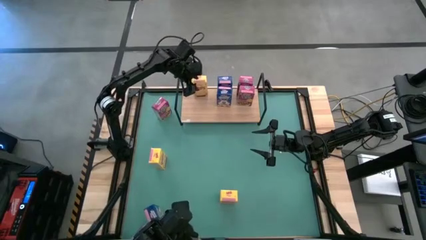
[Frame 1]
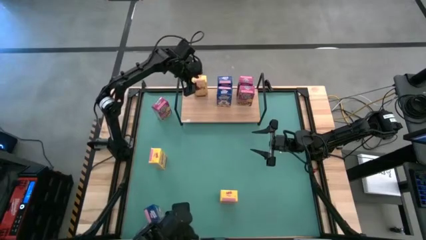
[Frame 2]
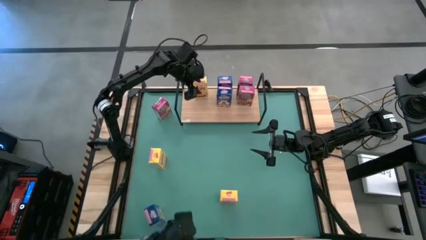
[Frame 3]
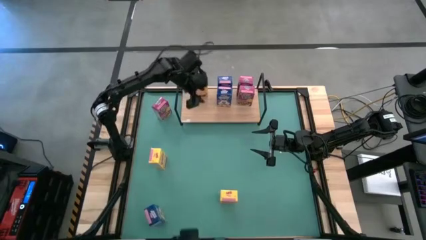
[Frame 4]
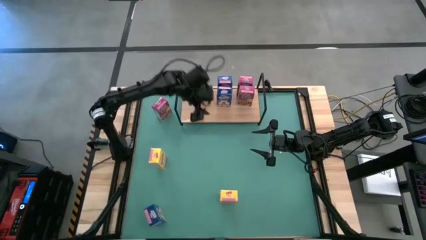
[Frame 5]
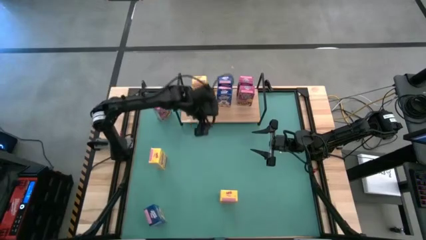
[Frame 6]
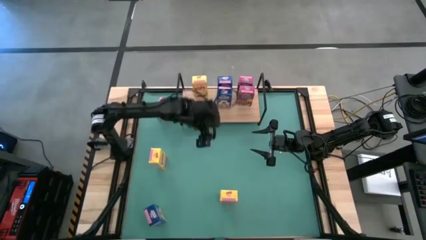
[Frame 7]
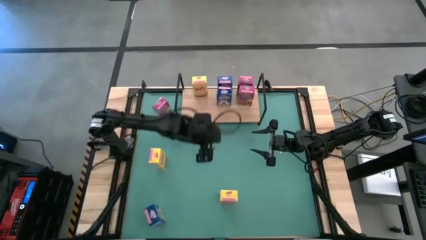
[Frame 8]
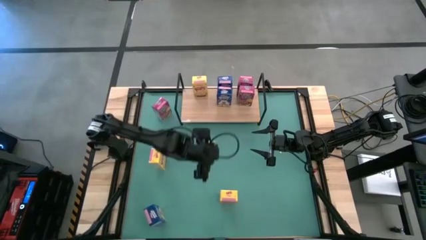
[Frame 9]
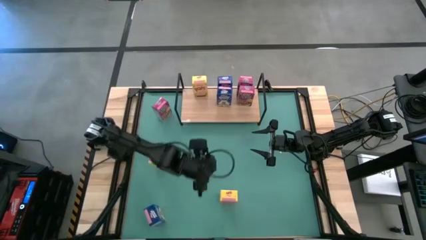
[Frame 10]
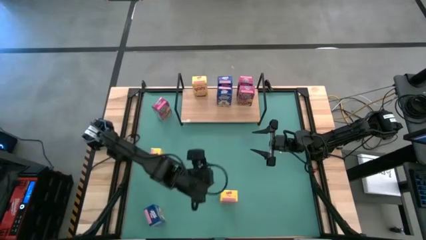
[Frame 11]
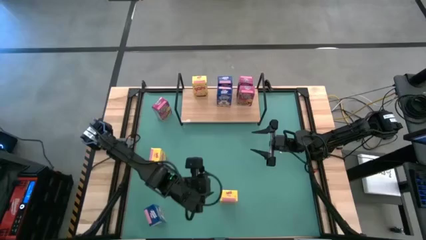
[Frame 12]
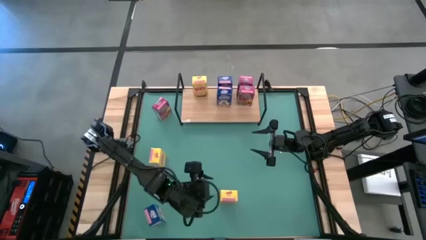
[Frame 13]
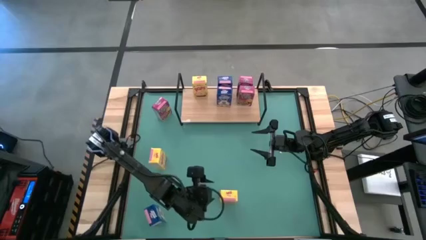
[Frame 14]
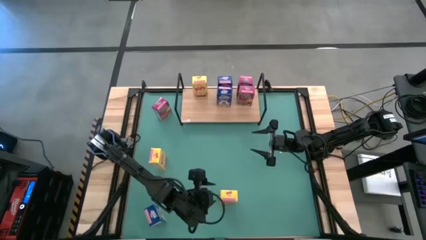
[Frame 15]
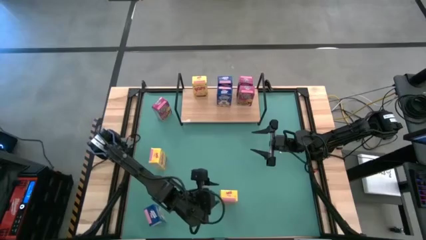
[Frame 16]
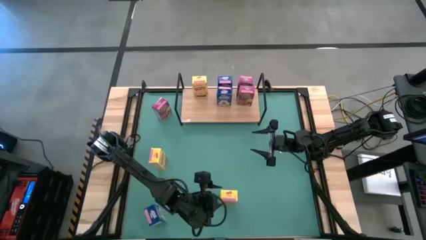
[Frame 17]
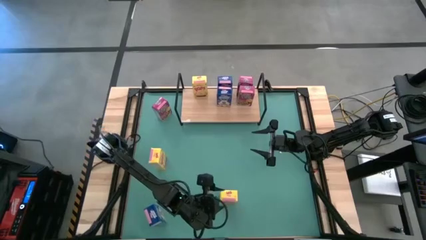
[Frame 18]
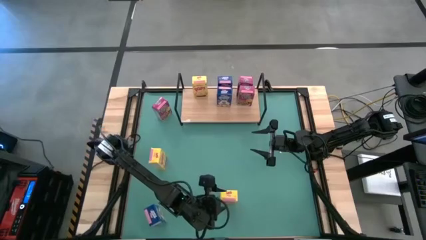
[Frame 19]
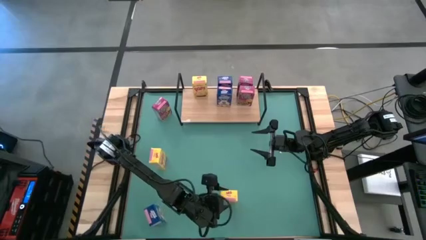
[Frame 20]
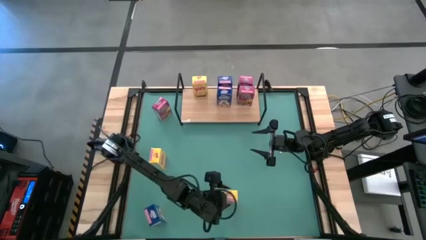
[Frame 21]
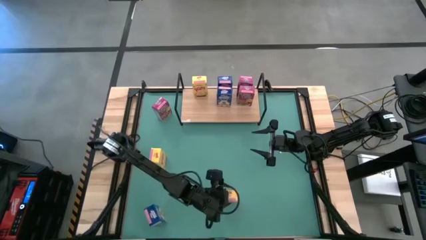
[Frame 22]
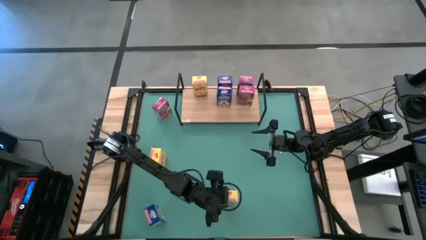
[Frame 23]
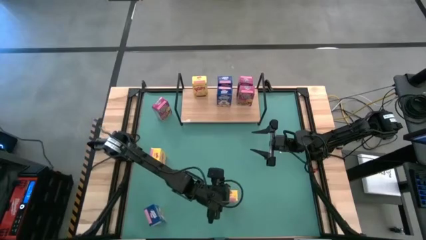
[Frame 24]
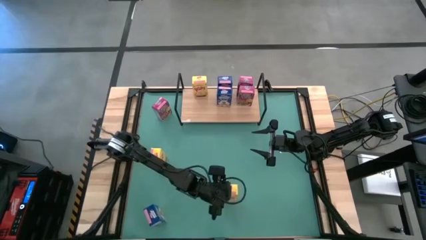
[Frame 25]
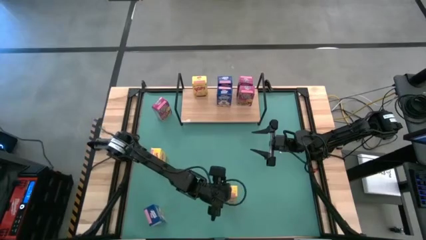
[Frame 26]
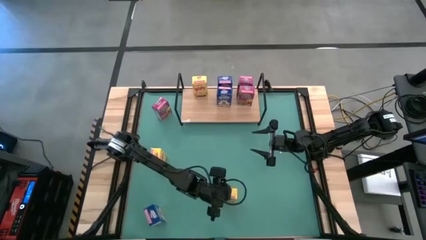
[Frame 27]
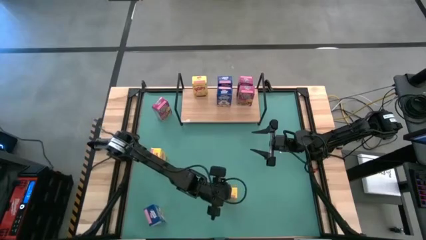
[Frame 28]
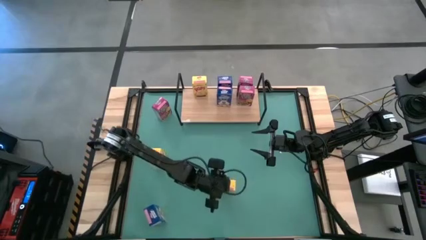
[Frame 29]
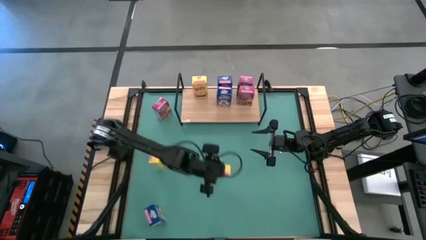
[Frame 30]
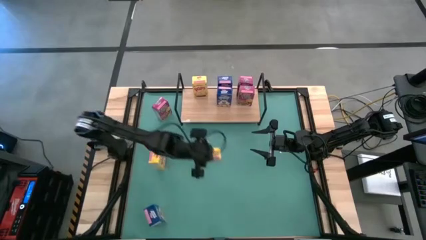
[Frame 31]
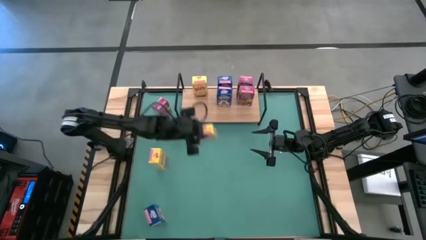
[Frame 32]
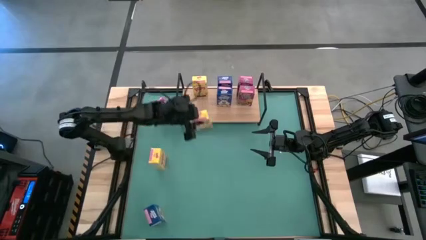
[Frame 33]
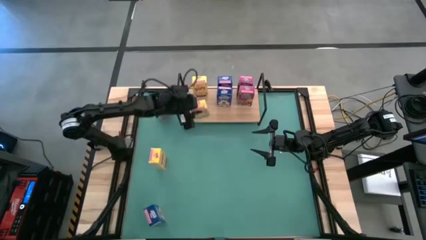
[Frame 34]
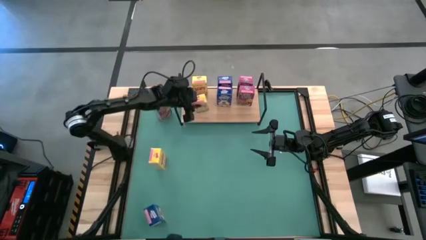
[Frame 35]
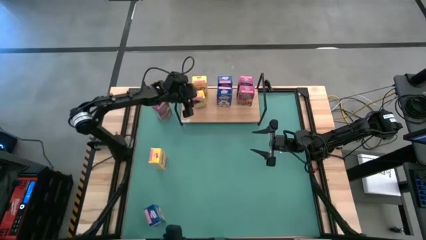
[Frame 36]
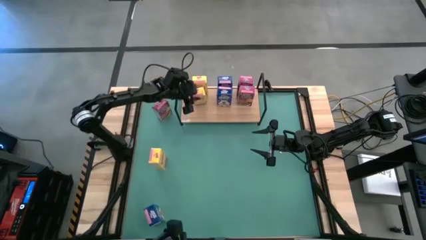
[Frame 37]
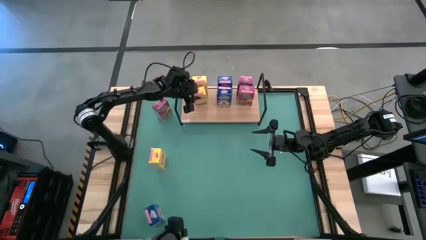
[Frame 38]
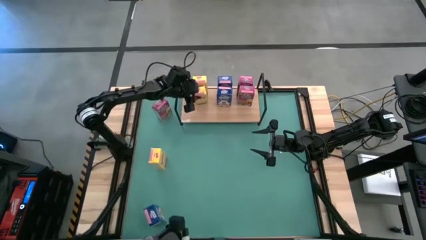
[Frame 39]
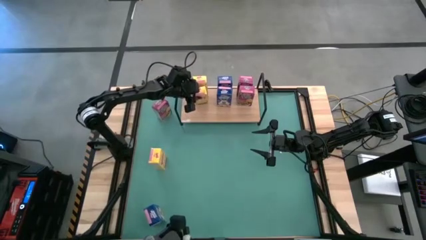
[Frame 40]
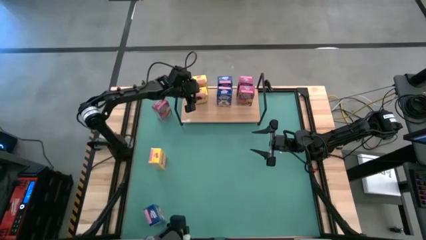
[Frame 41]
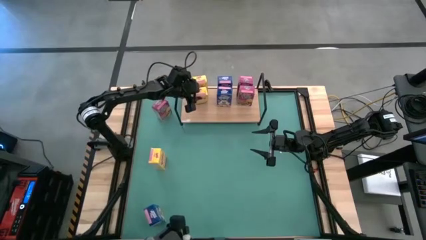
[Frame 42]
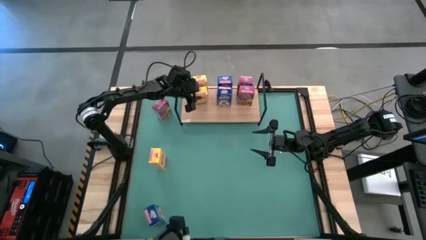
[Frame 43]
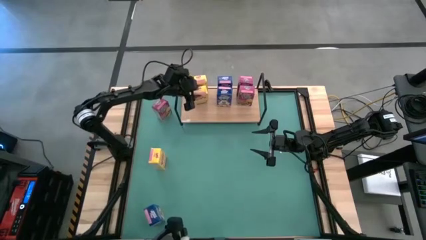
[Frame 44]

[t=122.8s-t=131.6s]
Task: Stack cereal on shelf
Put the right yellow cereal box on the shelf aligned with the other yellow cereal box

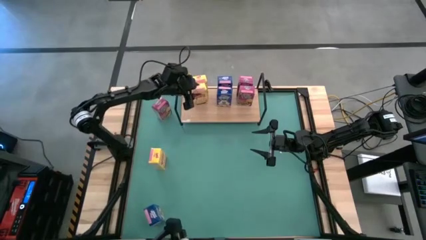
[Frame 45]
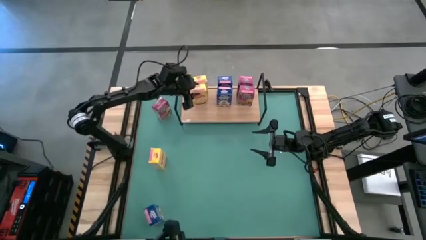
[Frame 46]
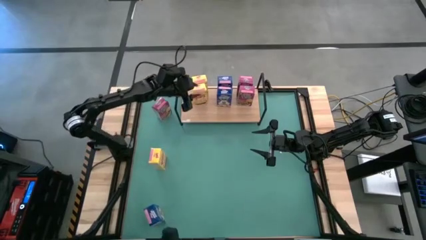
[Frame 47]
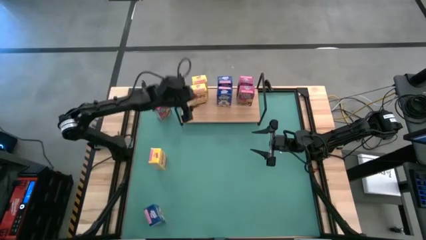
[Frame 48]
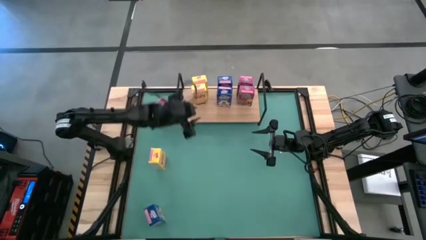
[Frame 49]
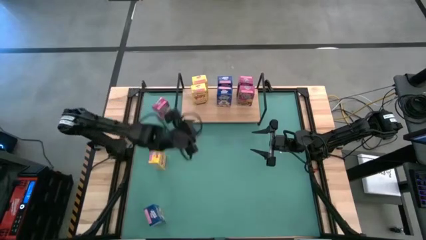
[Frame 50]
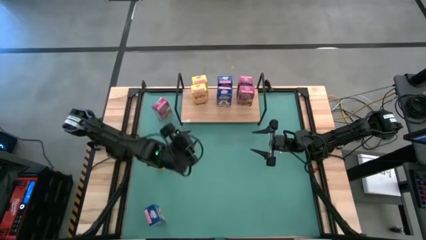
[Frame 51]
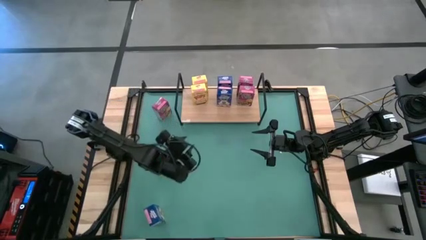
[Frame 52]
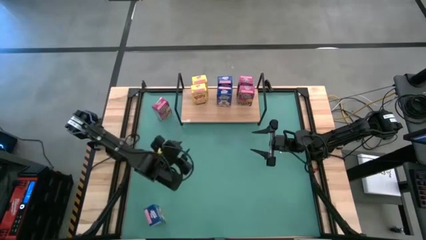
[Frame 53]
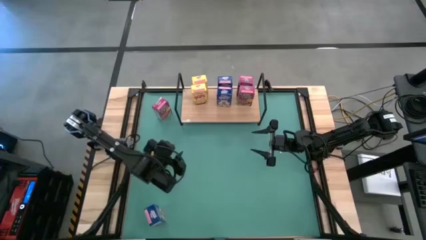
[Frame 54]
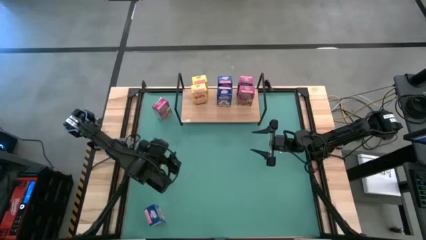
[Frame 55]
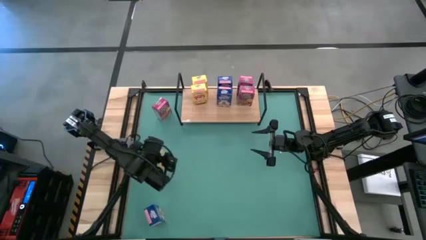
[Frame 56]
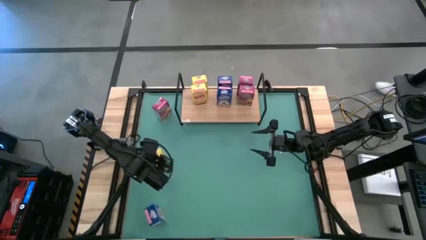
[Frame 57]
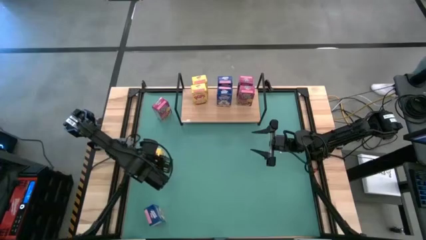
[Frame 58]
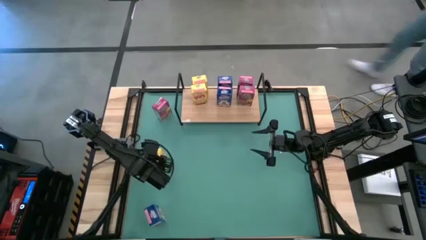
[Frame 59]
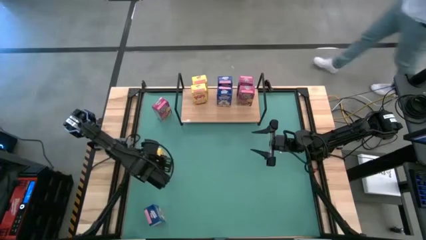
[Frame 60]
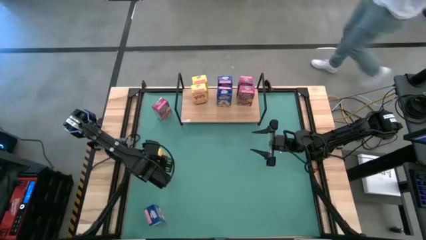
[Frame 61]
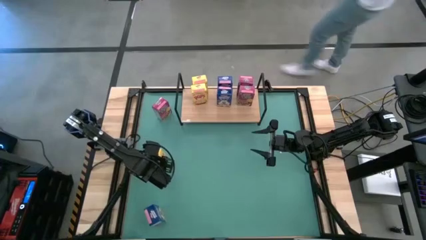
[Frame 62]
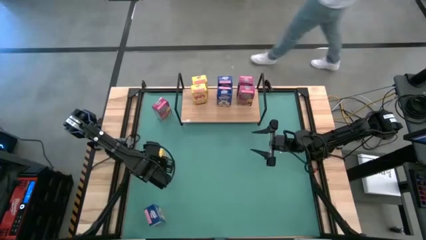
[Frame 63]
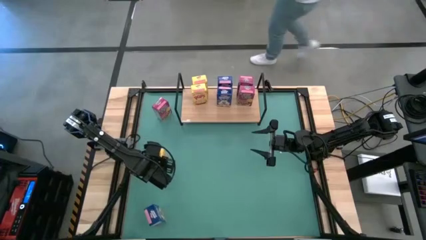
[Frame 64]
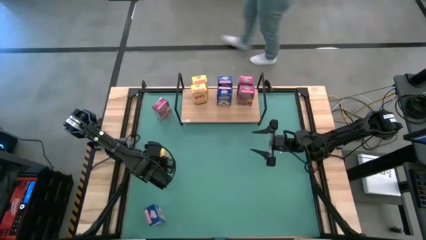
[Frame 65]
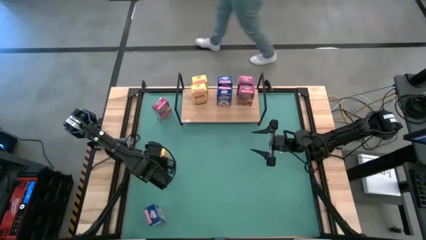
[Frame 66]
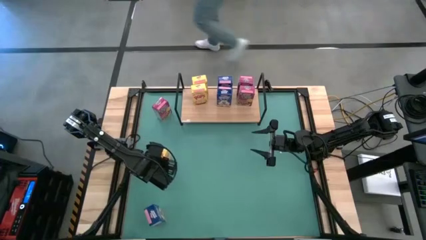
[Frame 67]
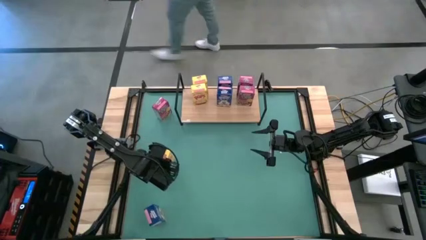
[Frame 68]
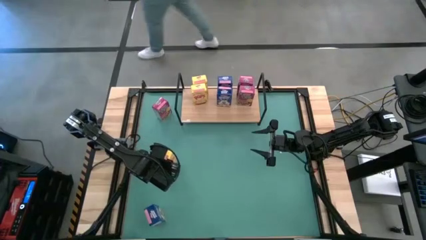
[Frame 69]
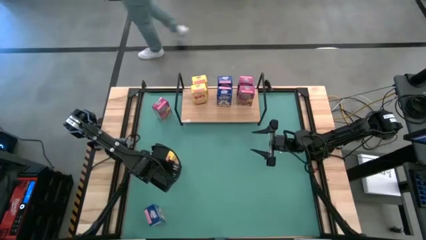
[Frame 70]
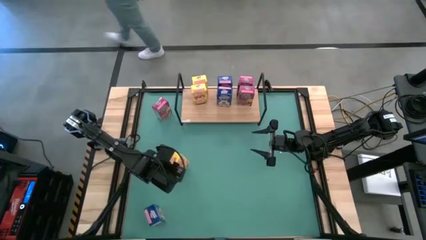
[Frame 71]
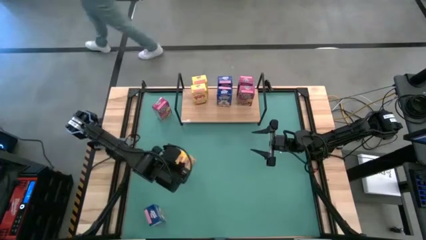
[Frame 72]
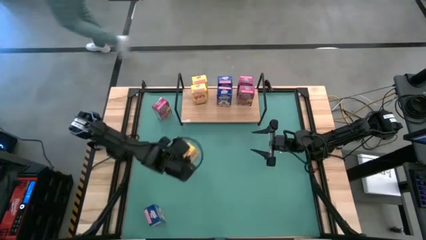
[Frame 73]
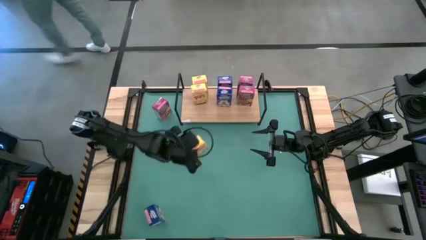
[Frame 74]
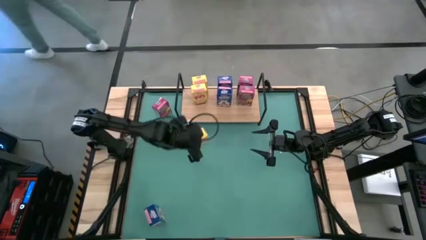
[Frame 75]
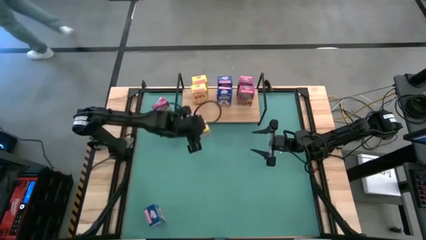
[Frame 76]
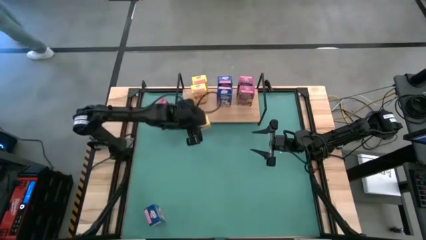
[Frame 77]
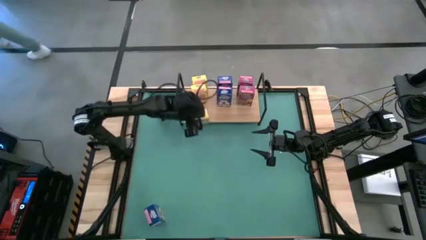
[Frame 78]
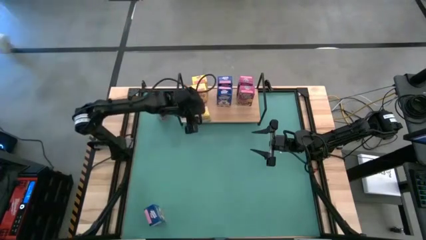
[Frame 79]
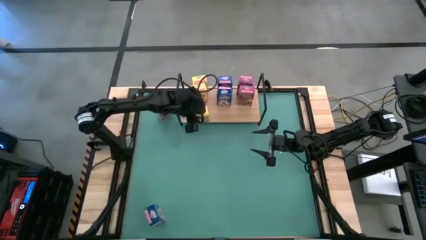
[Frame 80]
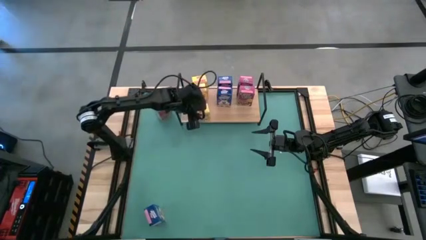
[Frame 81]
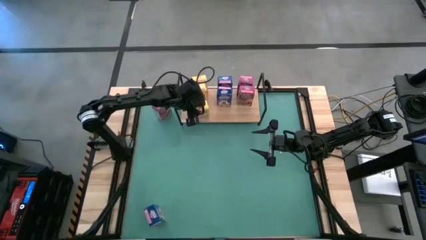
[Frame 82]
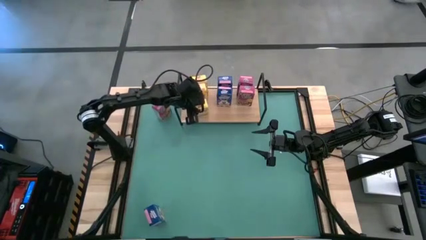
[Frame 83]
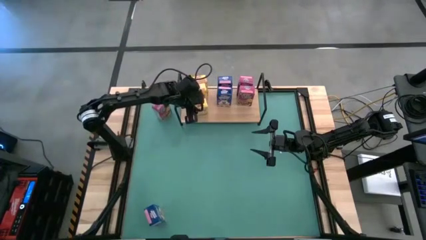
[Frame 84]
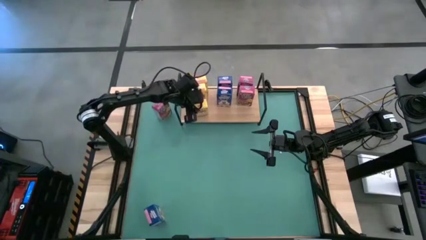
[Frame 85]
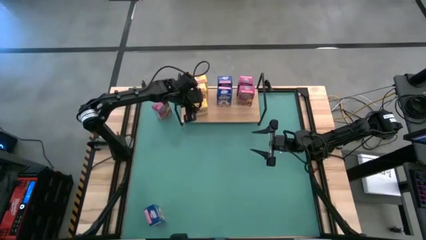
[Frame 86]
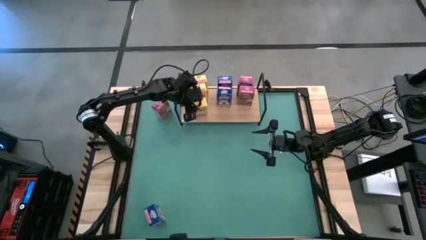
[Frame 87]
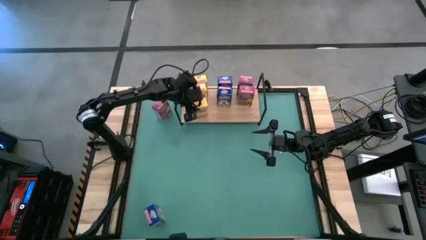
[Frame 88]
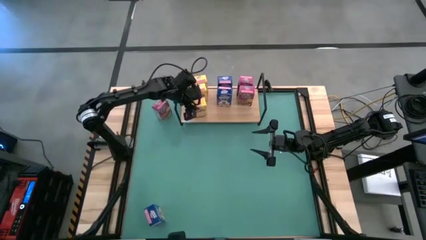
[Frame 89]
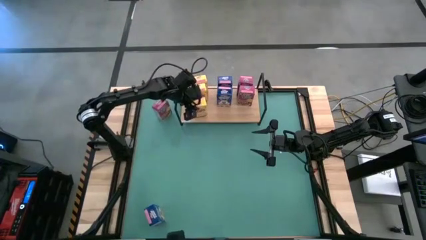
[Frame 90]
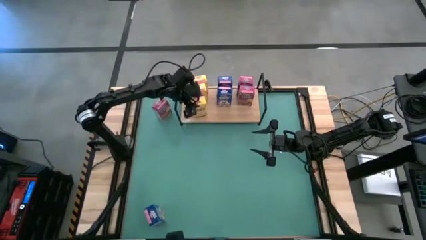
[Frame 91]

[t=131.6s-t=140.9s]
Put the yellow cereal box on the shelf aligned with the other yellow cereal boxes
